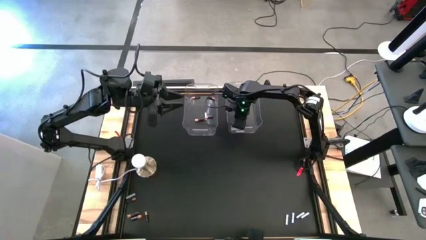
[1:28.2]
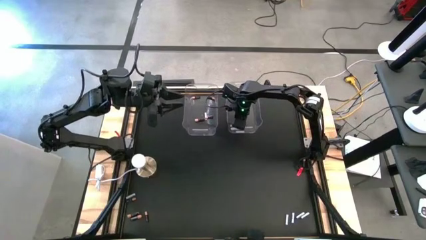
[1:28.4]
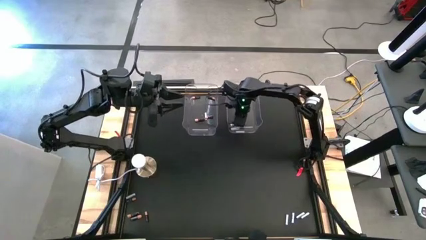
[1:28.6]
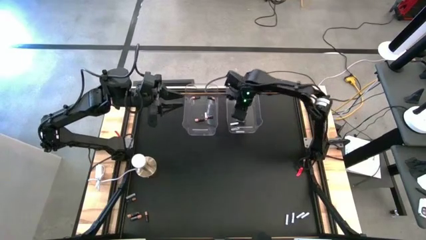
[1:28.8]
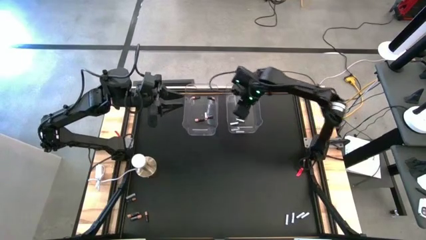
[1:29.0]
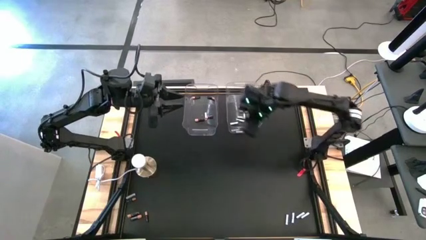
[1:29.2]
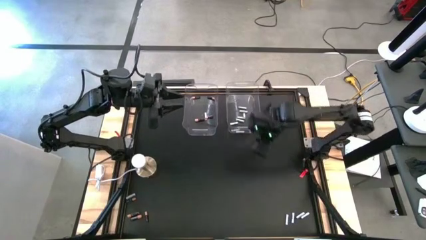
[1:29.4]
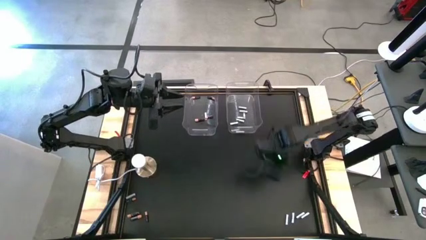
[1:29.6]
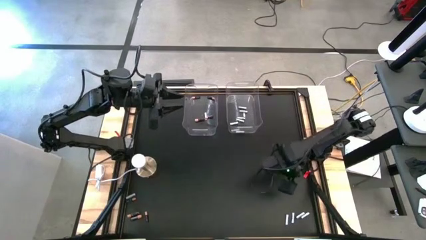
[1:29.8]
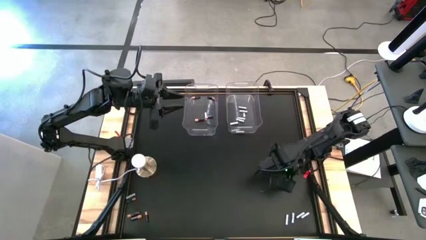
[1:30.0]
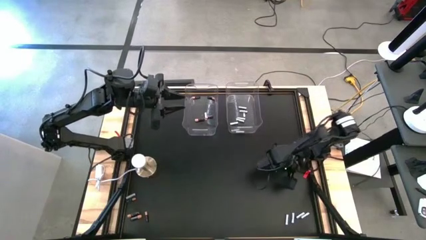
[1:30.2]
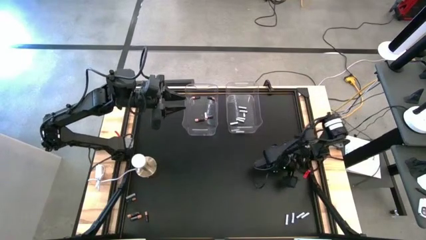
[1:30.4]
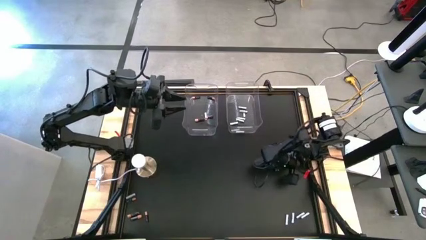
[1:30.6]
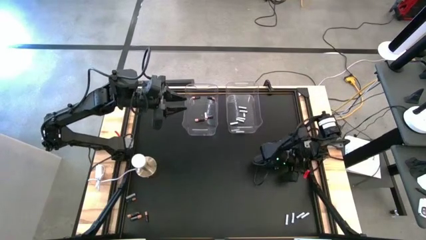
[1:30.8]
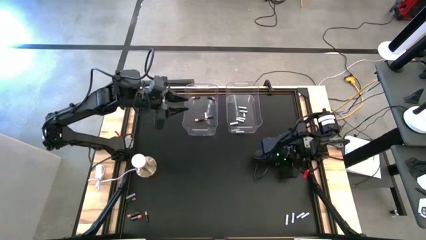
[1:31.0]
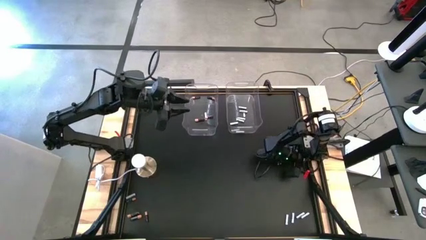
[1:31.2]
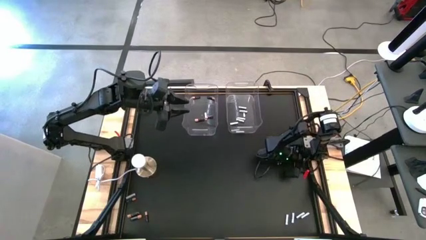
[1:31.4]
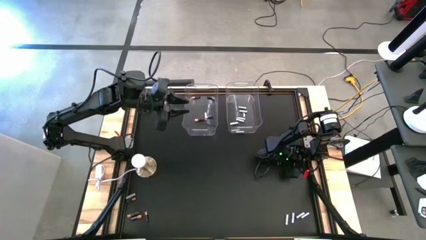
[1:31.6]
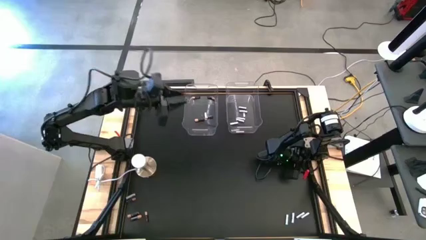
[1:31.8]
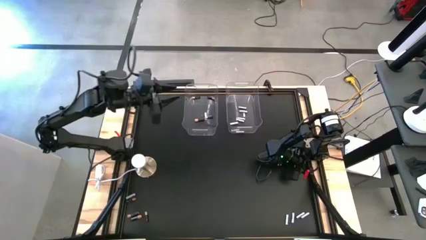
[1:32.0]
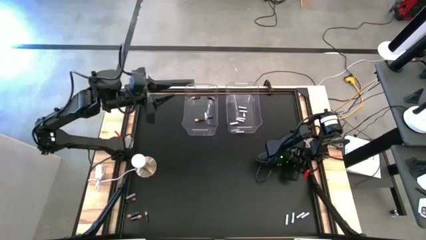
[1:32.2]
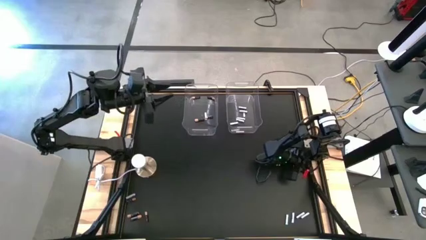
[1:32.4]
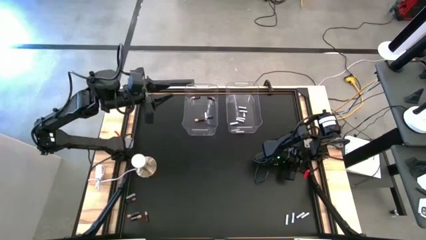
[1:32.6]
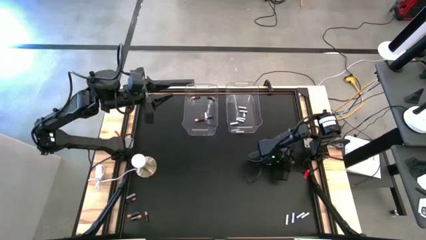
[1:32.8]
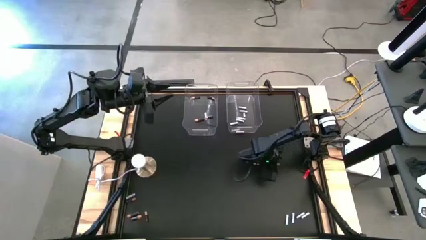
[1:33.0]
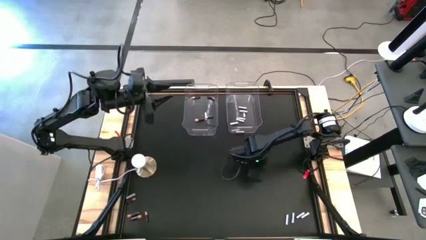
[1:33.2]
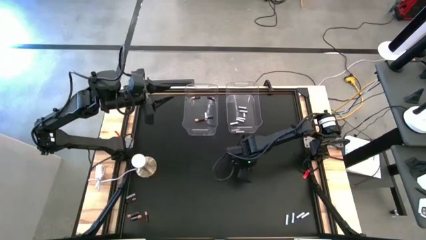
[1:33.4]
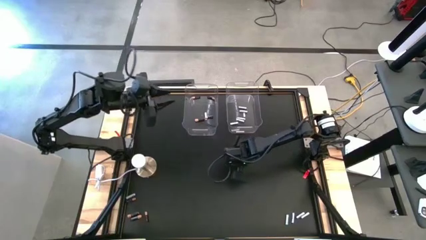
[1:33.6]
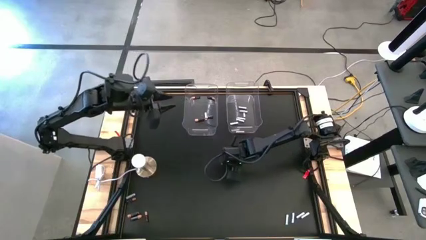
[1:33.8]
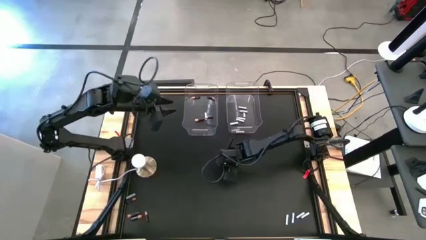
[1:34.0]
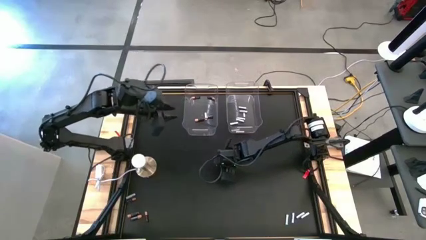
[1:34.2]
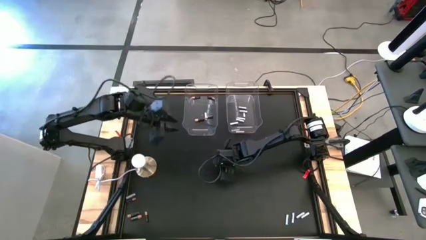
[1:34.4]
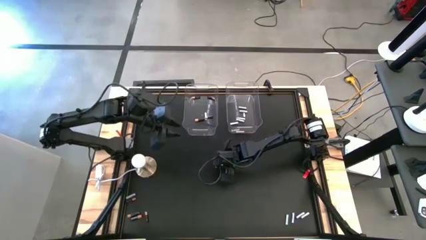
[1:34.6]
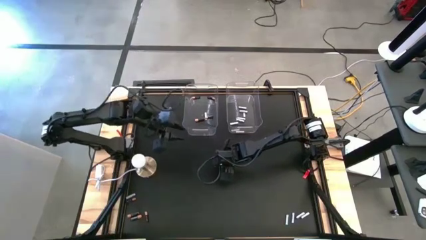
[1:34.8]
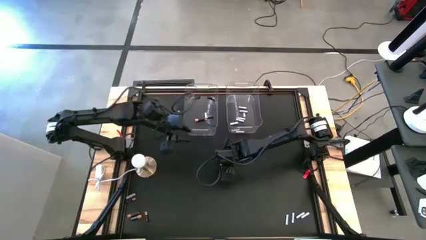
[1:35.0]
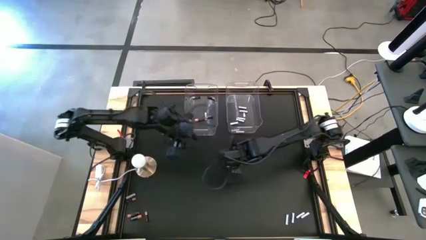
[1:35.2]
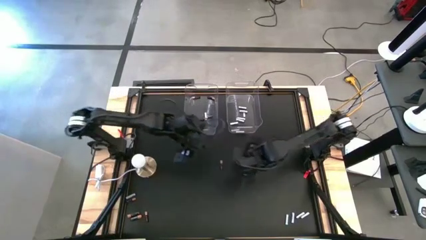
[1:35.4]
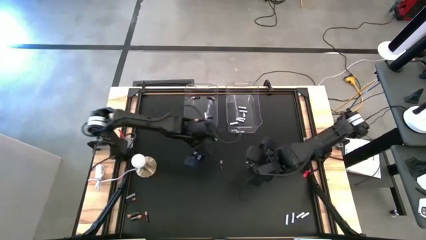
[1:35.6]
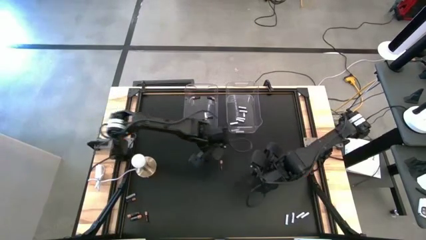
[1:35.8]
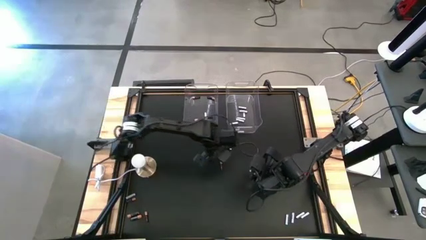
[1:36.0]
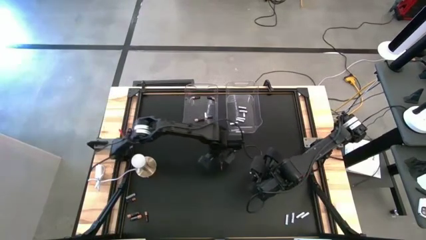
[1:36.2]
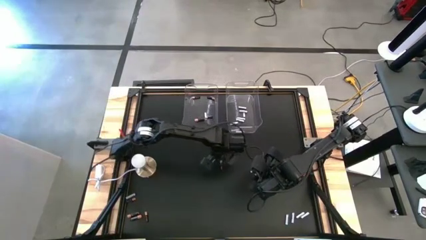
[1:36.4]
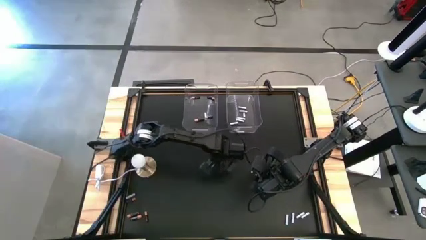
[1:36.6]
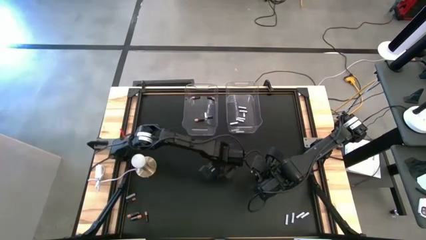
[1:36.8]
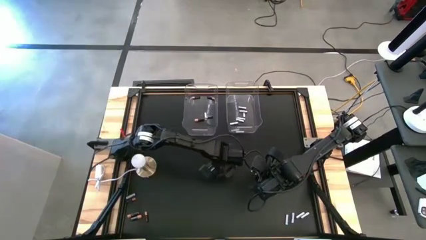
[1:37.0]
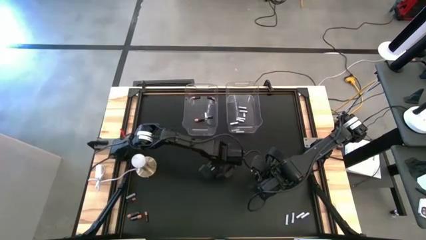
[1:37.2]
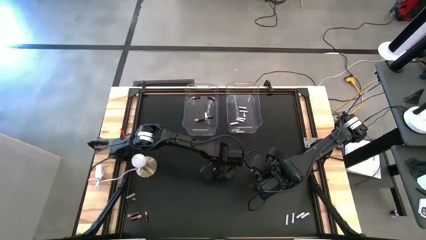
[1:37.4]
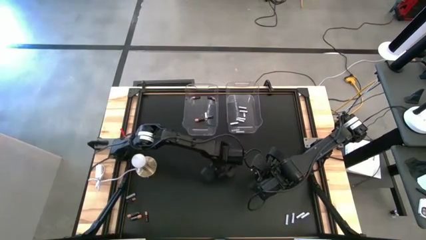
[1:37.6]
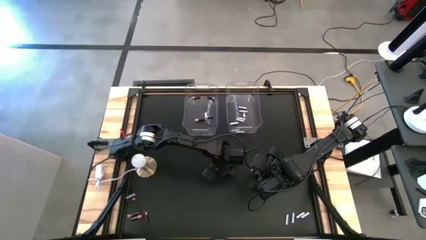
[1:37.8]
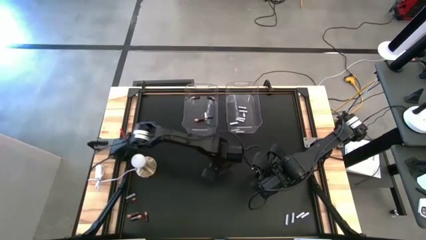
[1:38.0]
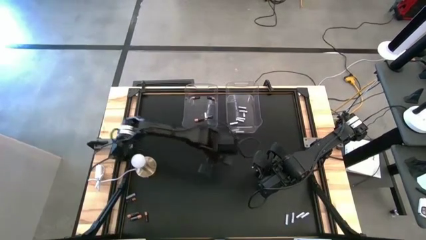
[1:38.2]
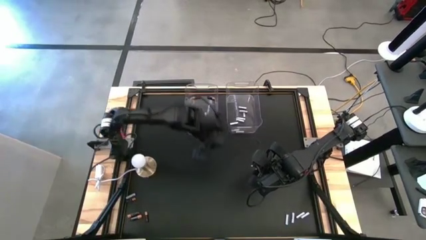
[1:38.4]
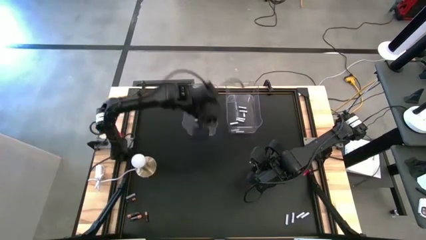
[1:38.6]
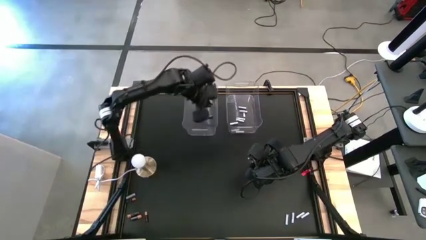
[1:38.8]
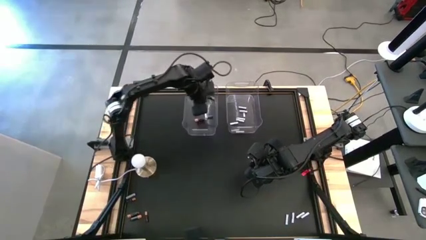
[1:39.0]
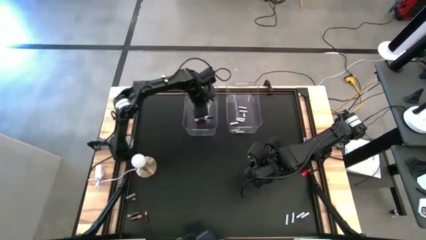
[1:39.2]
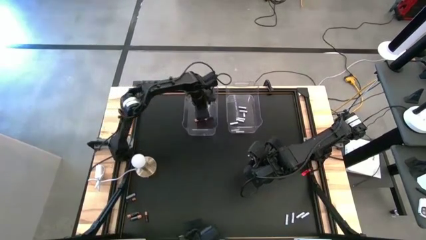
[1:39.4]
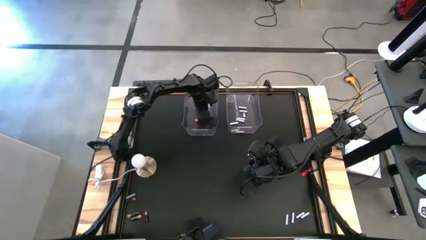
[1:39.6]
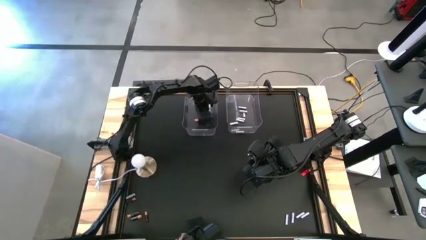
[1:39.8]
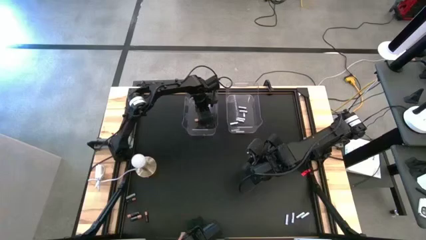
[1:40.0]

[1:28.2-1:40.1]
Task: Sort batteries
Put the black battery into the left transparent bin

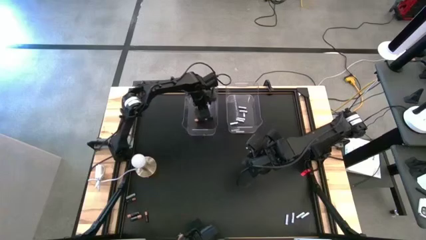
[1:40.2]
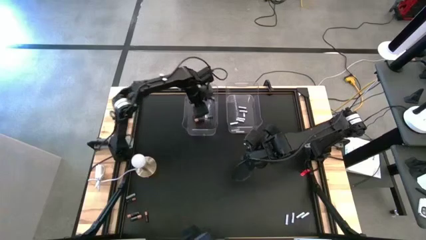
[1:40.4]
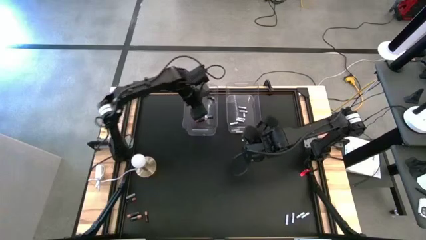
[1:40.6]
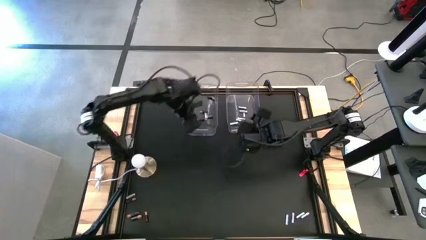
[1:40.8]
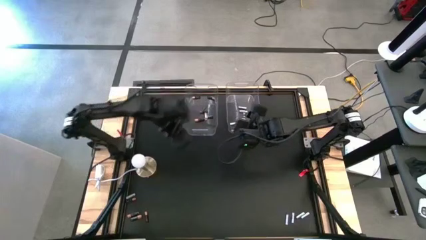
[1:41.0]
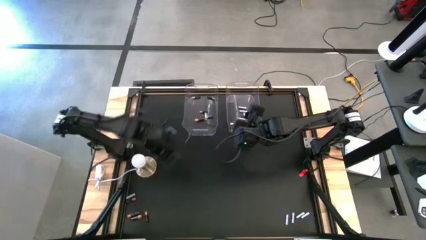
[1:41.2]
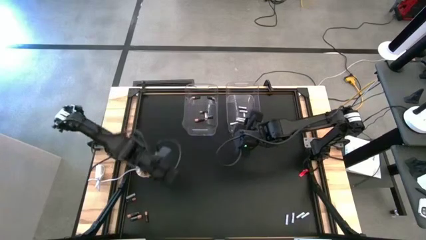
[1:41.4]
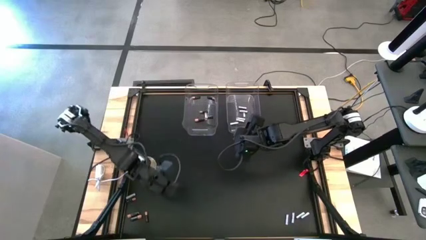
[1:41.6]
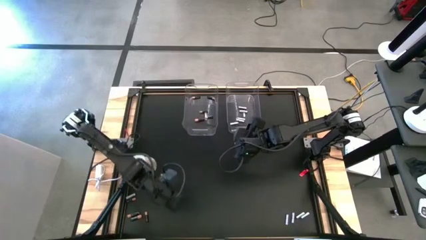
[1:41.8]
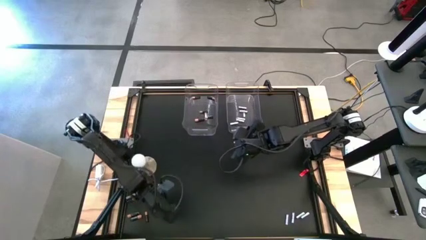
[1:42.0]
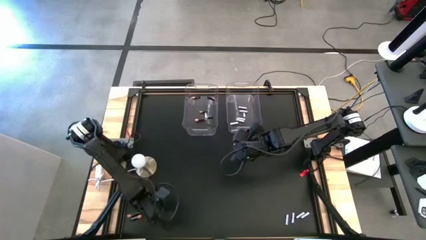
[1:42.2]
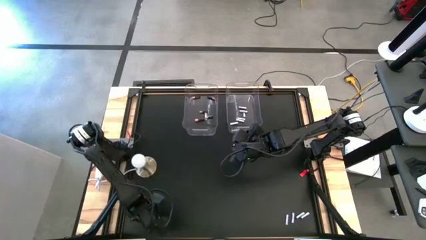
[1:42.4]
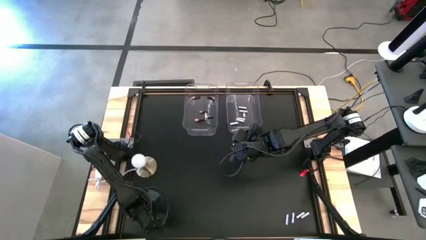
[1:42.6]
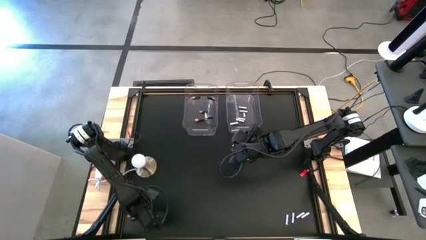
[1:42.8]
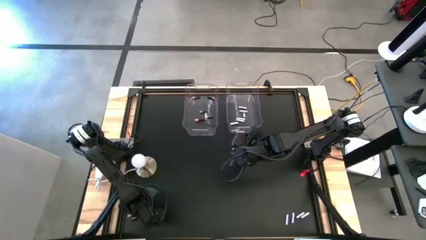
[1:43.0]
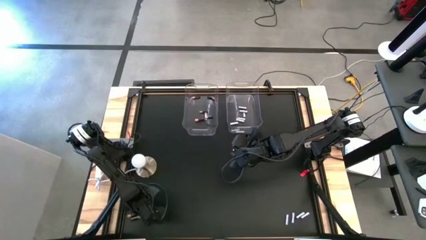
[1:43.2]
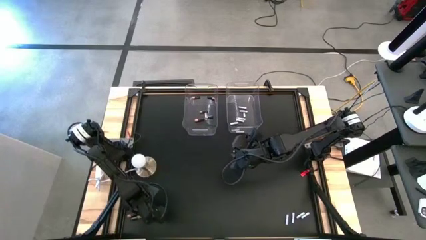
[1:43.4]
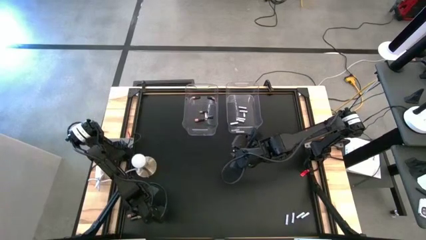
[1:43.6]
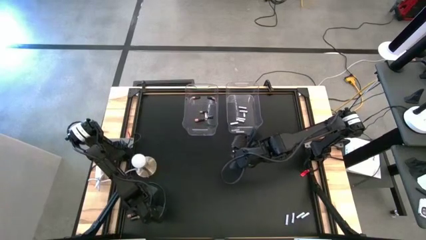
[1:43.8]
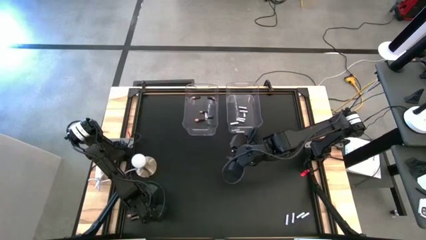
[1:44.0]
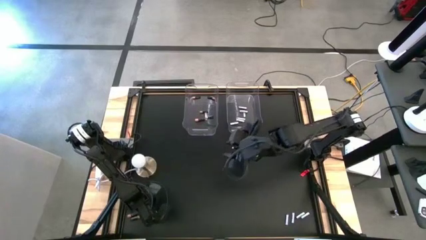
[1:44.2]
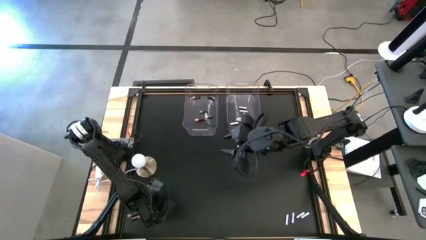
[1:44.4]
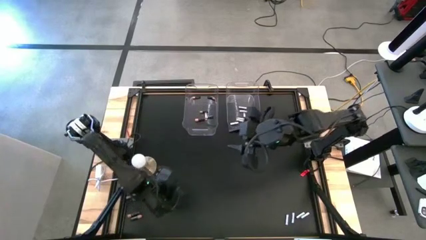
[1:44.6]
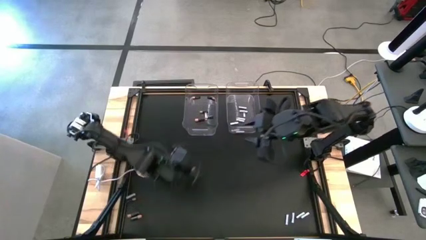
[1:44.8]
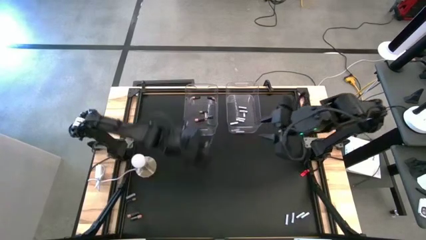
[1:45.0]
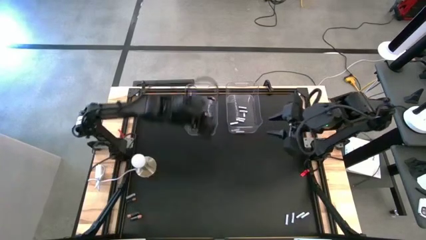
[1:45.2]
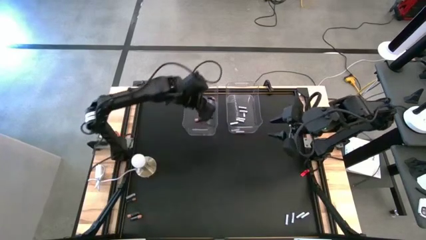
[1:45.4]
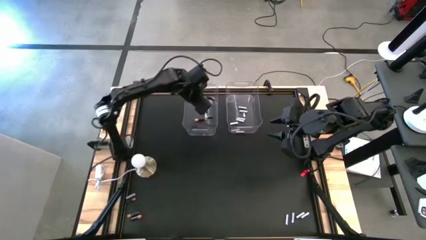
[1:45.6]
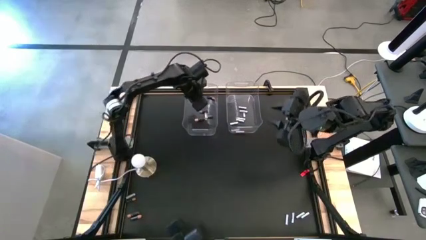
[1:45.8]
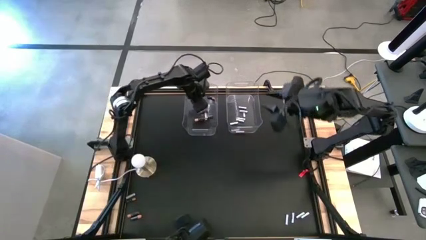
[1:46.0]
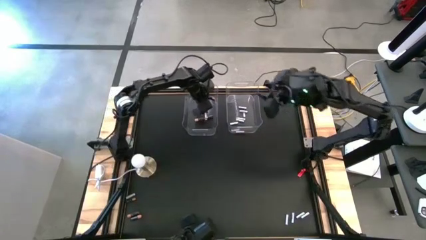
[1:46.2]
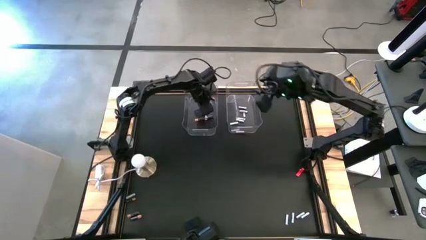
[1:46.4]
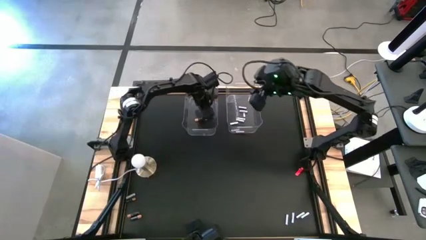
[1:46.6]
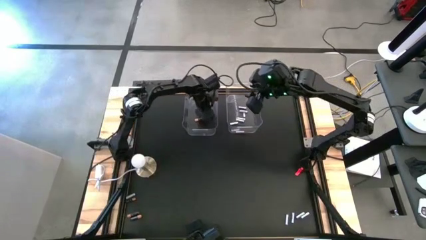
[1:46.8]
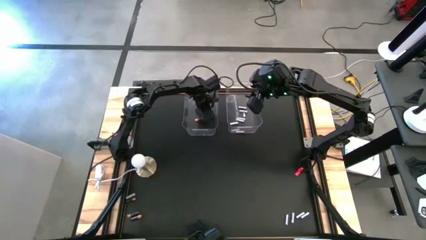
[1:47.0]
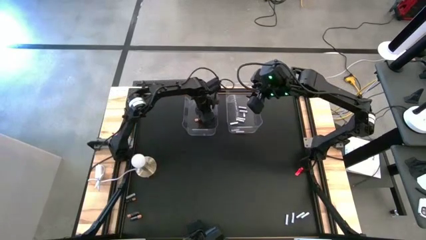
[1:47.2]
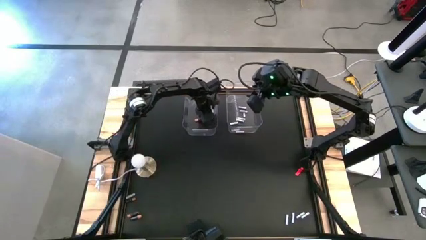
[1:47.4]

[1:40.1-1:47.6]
Put the black battery into the left transparent bin
